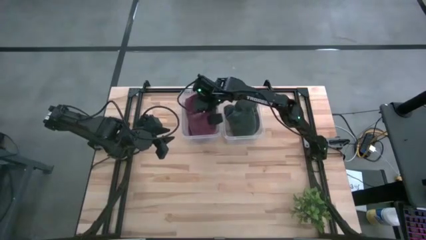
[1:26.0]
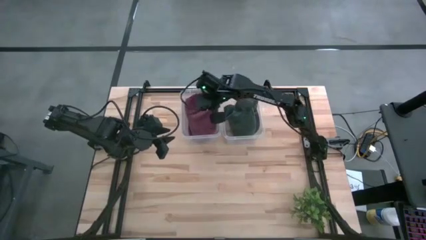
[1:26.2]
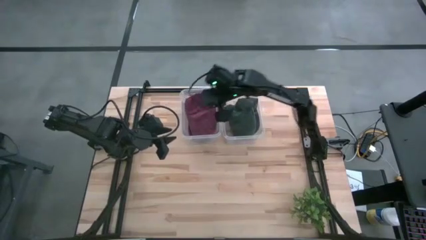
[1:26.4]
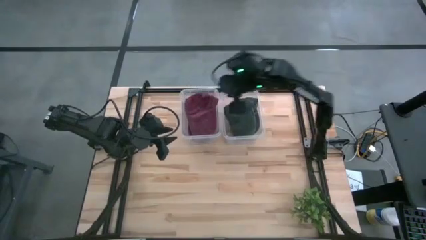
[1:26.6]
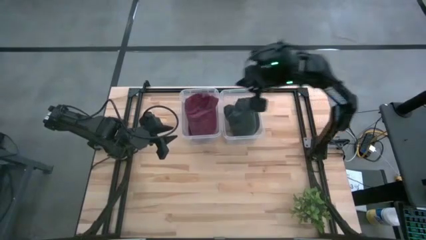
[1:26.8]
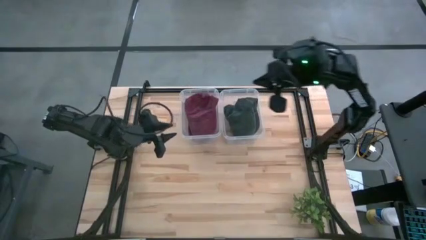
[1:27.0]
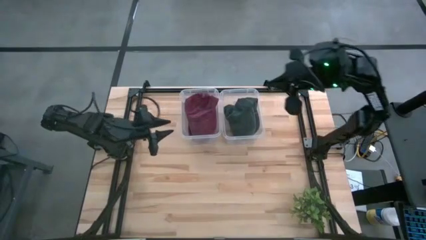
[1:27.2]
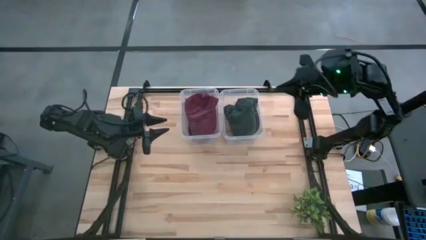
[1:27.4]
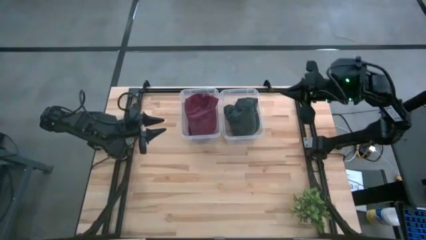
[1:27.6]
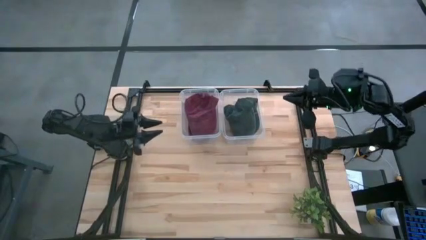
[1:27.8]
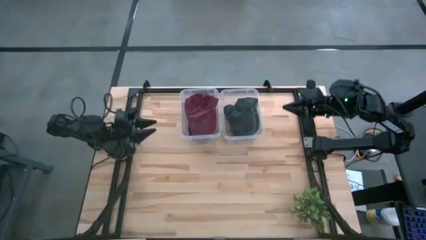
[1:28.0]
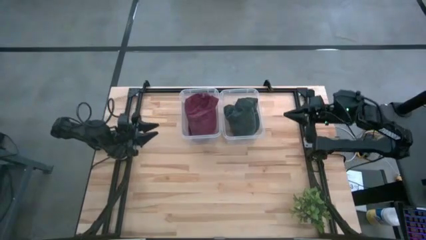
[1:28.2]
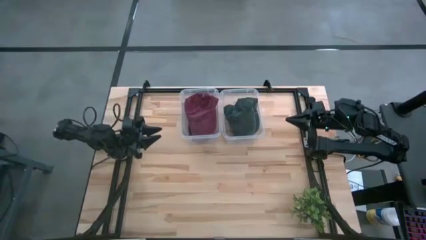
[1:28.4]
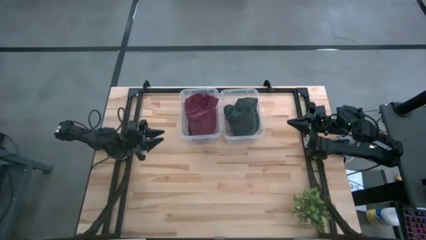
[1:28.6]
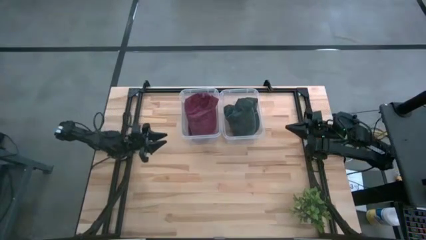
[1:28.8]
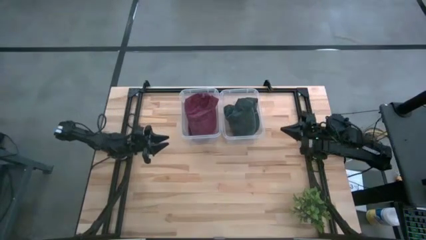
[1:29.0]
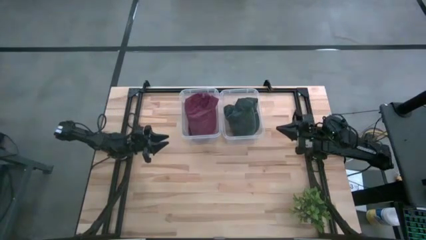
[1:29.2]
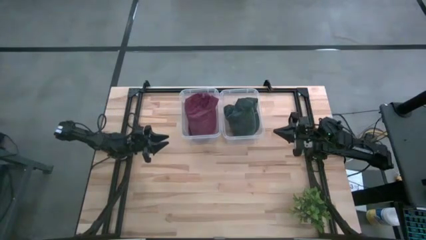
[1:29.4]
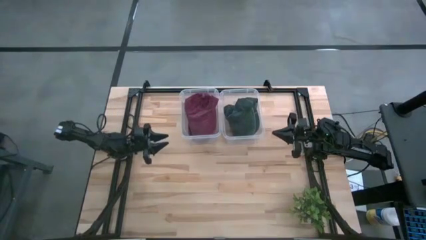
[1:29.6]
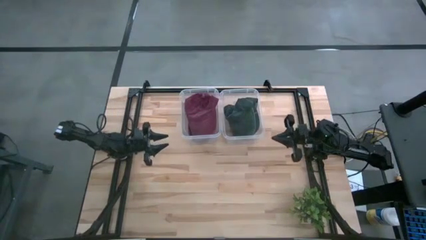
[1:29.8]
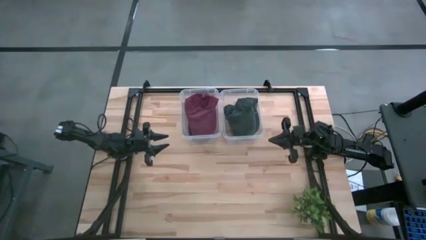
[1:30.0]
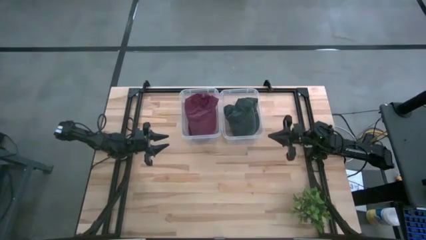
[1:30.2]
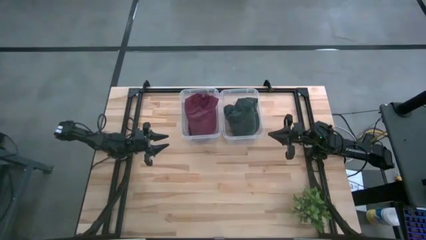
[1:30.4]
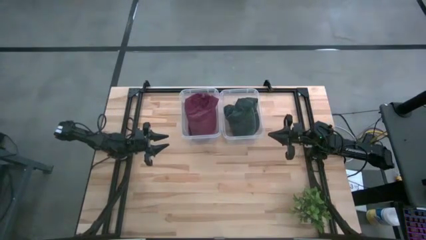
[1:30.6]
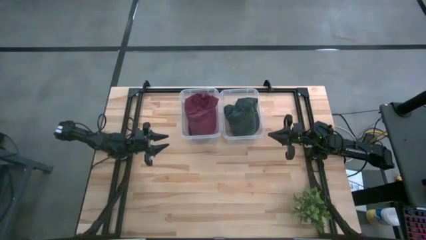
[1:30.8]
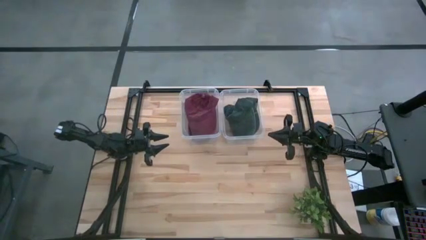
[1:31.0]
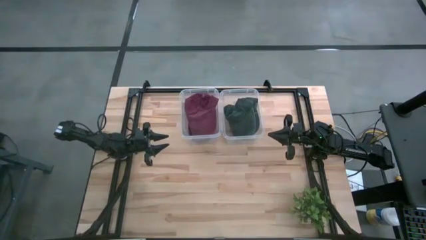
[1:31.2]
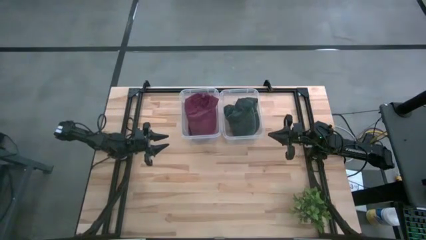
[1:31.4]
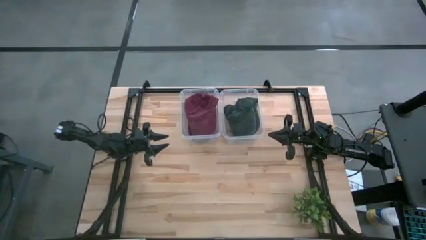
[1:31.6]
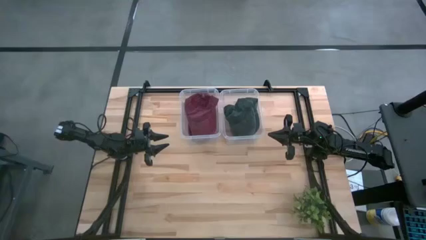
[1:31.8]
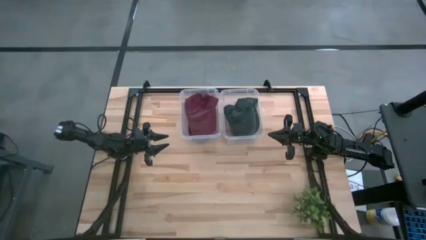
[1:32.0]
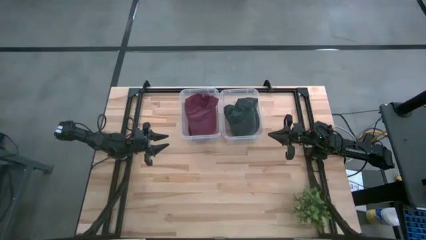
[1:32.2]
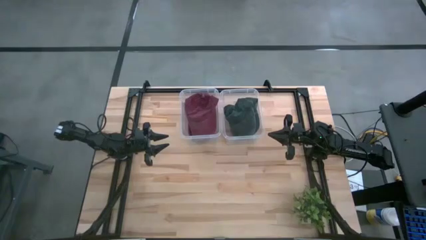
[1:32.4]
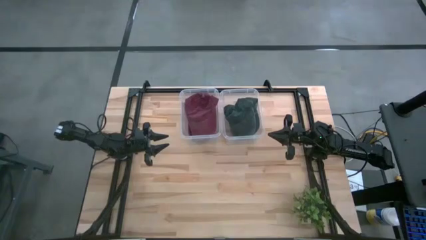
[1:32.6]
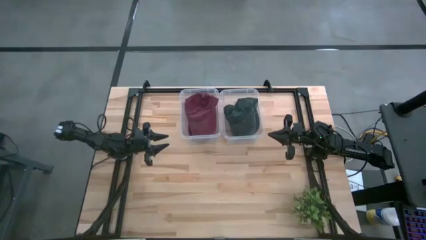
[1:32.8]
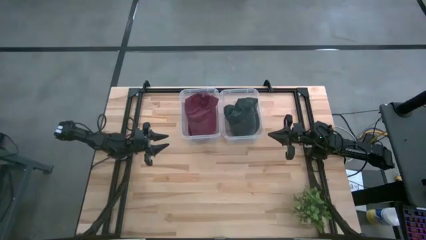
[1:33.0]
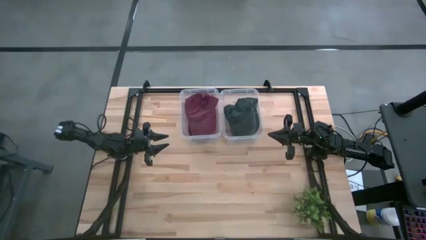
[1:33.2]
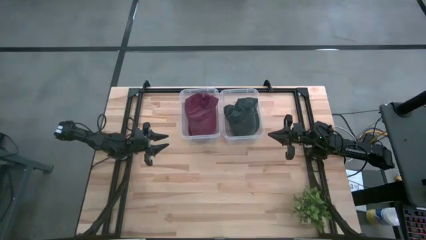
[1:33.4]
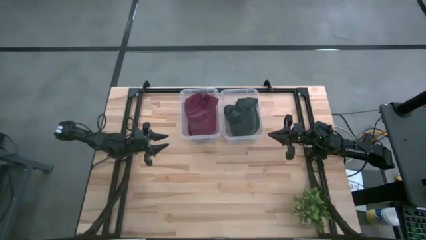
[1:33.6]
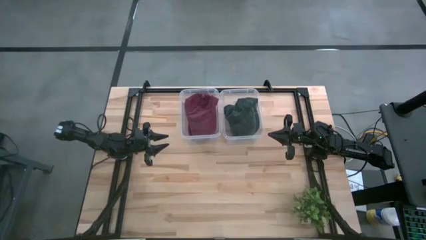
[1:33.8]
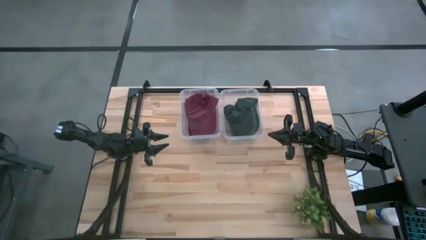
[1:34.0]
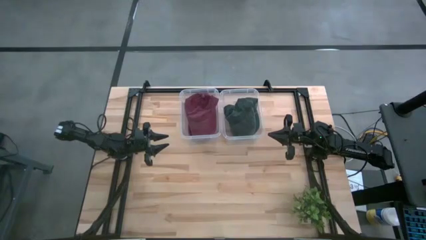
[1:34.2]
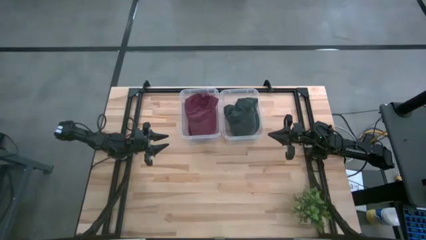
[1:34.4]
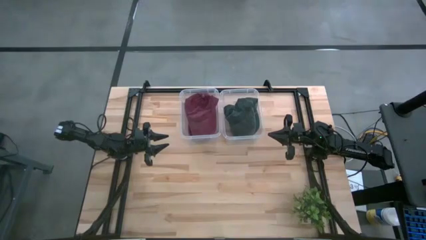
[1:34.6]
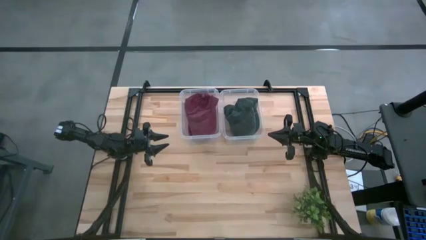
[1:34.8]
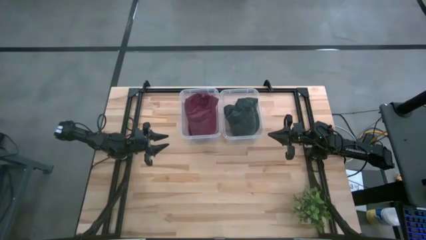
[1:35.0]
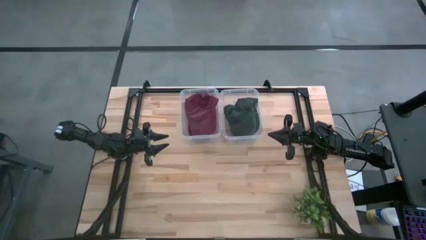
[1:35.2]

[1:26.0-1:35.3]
Task: Pick & Place hat
Return to Home Position

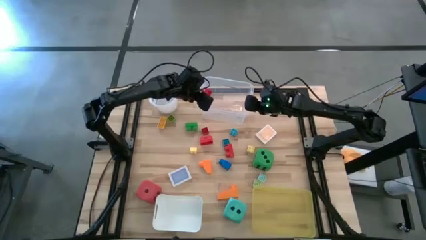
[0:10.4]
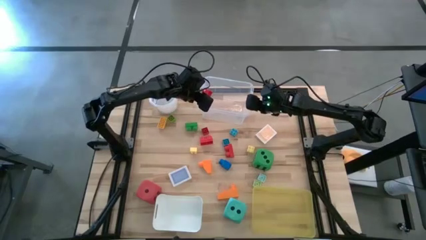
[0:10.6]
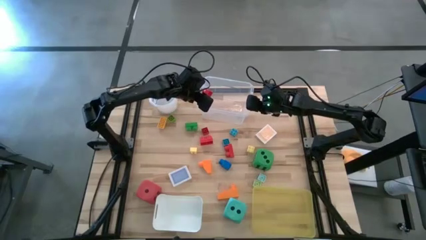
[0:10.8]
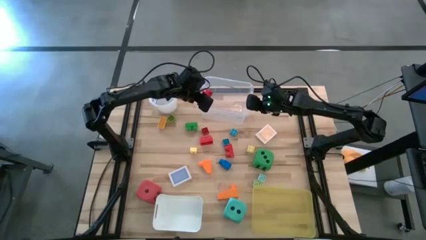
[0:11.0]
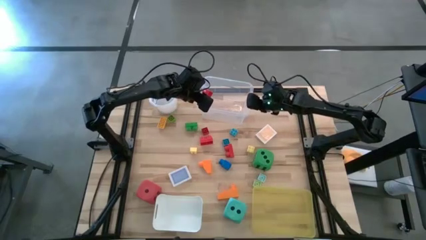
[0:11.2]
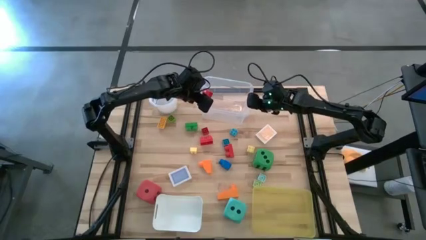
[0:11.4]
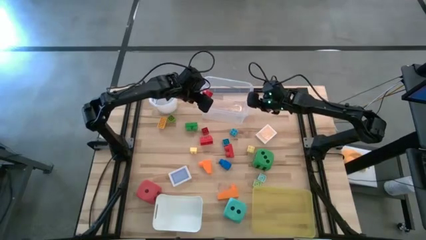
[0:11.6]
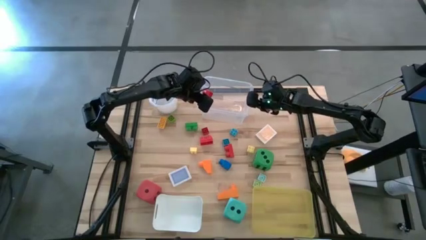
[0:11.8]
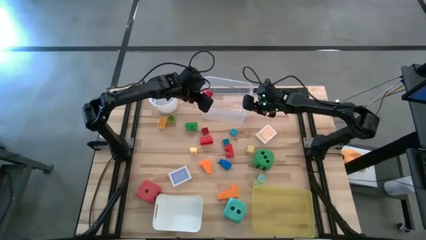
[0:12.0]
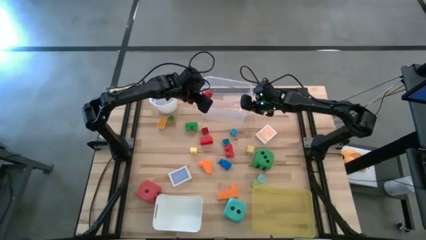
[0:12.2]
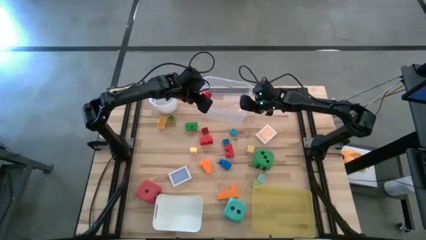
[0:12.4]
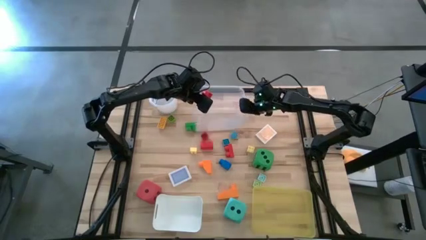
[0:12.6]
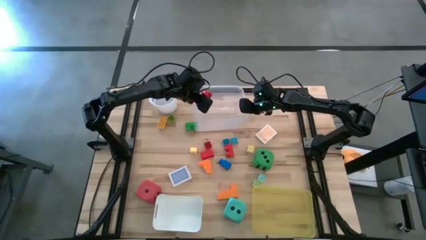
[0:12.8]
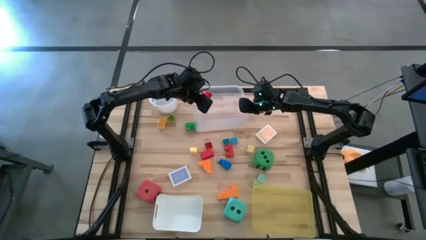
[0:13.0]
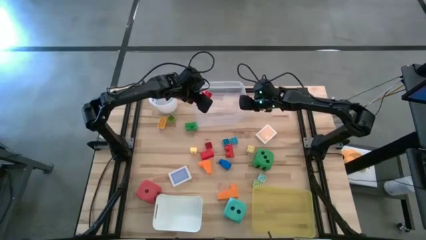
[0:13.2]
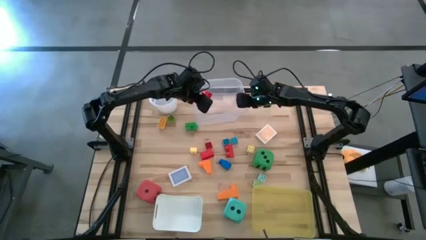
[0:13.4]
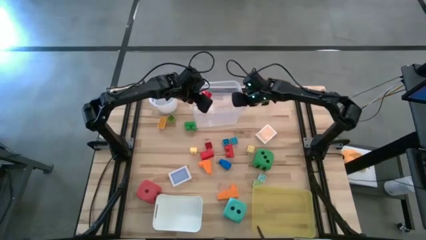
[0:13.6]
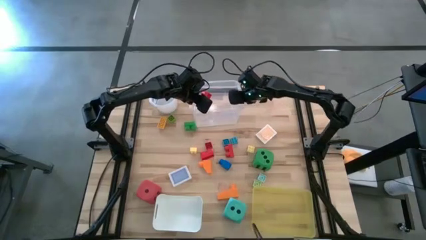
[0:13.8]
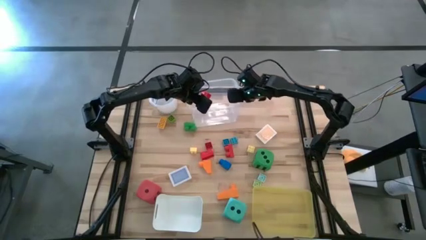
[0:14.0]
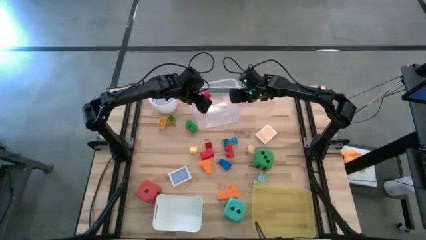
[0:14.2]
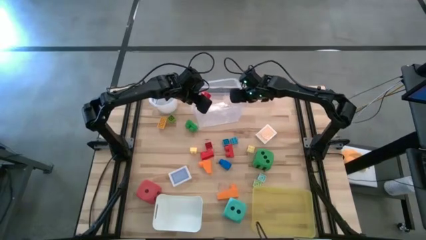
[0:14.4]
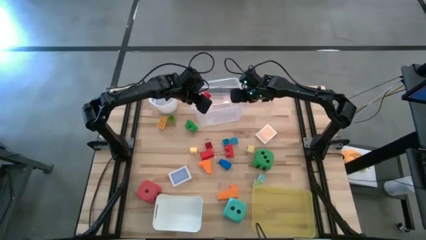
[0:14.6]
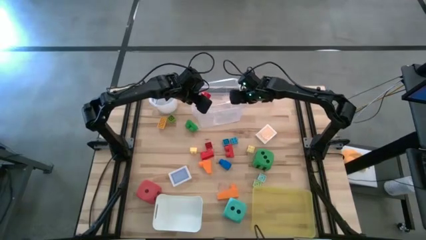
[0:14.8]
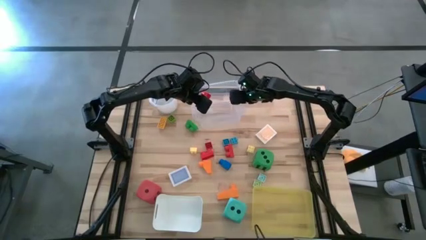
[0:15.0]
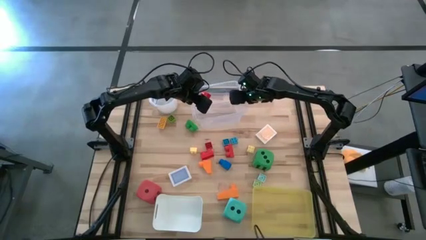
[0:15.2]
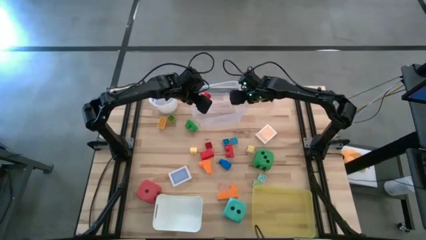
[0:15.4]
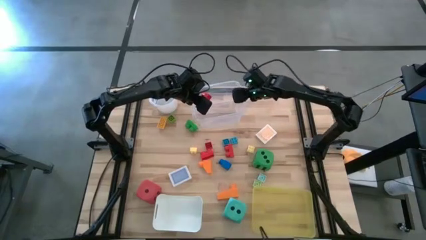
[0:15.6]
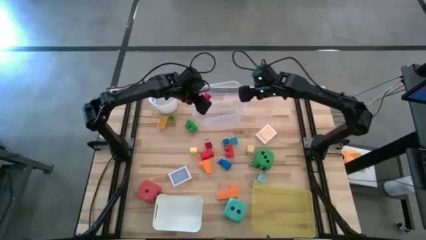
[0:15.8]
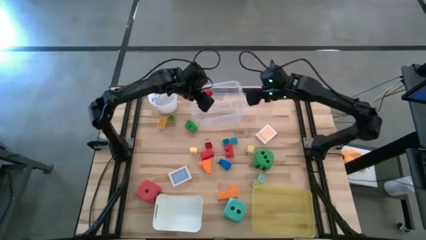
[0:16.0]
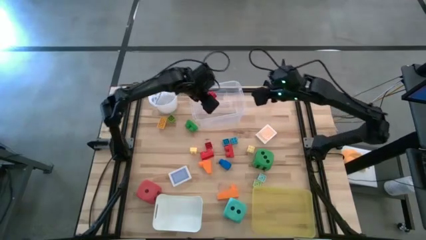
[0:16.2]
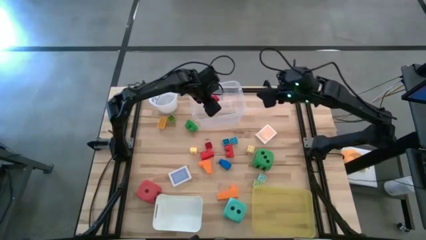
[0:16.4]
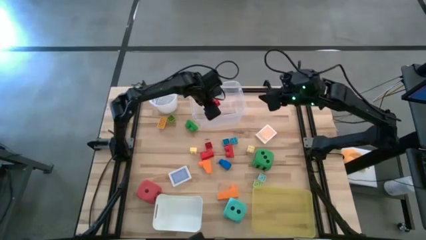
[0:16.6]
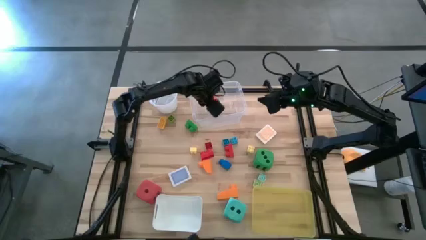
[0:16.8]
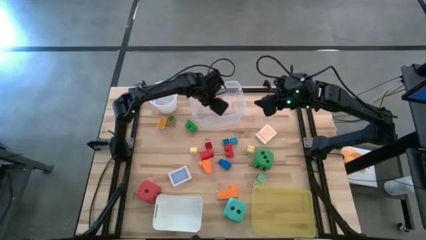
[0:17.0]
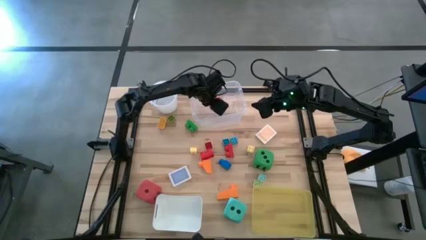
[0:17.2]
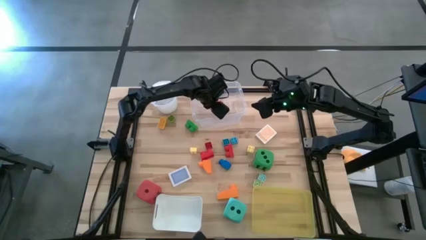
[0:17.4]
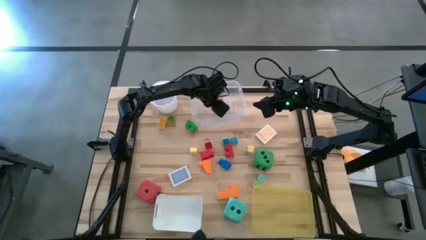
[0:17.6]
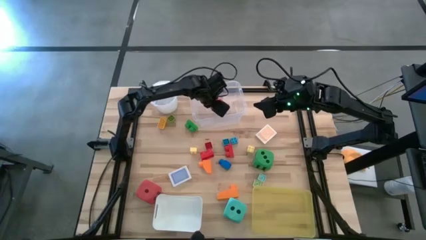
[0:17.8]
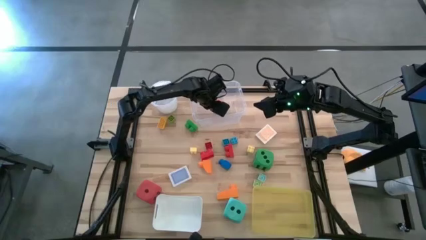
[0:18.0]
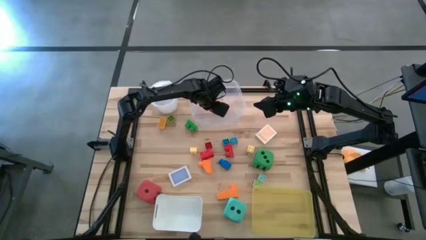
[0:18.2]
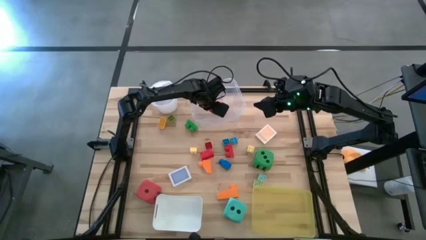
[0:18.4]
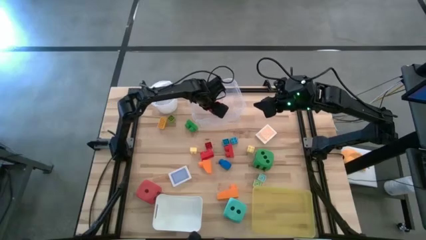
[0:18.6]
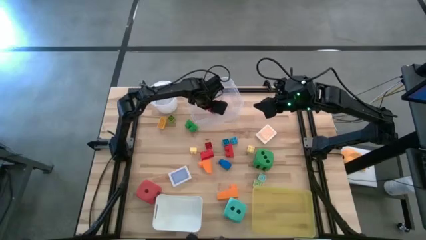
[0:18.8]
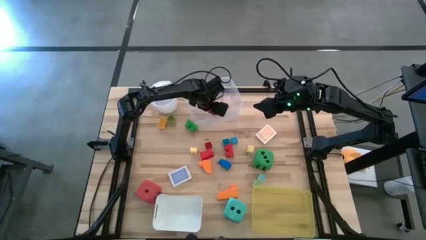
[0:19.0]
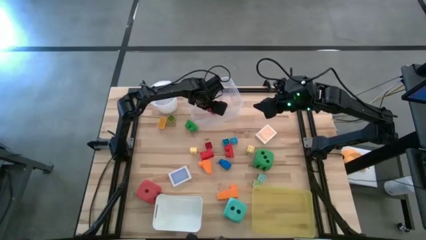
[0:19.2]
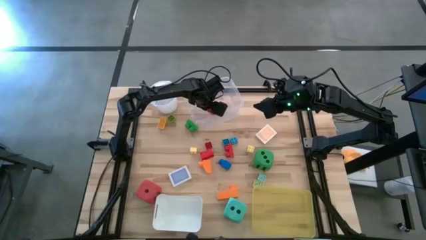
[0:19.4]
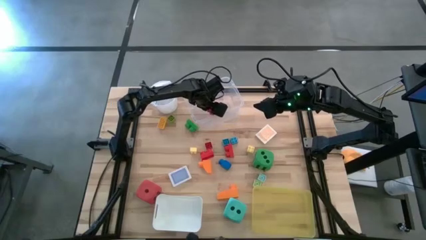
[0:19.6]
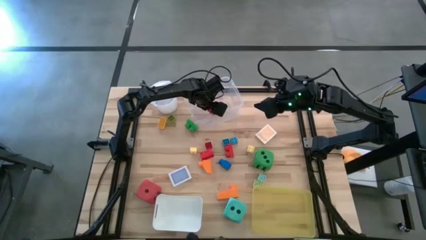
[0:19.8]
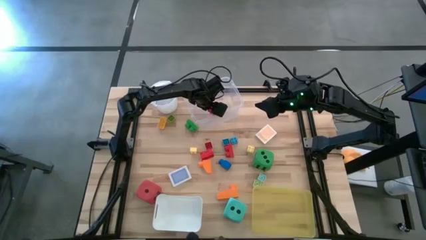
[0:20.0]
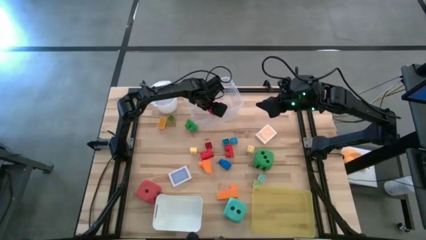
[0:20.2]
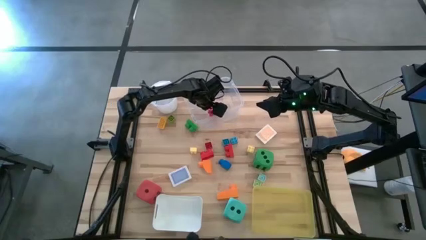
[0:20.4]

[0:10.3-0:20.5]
Task: Pick & Place Toys
Put the red game piece into the transparent bin
